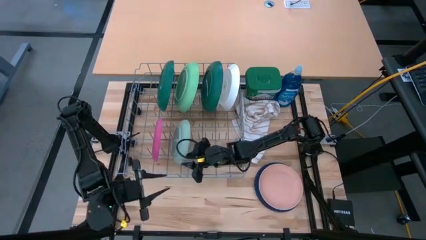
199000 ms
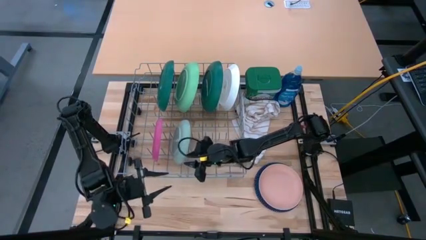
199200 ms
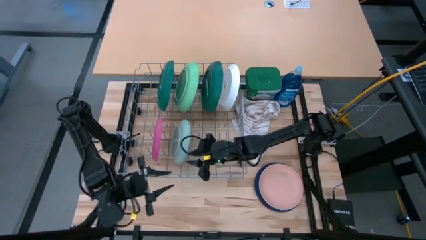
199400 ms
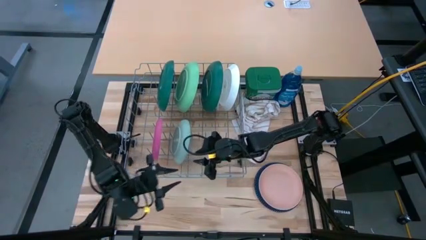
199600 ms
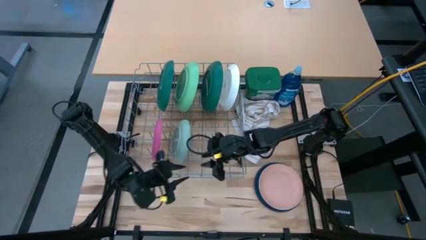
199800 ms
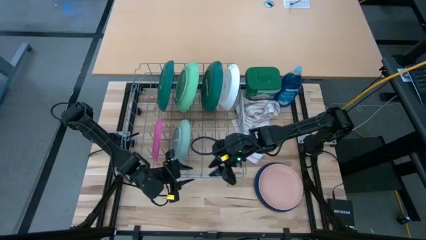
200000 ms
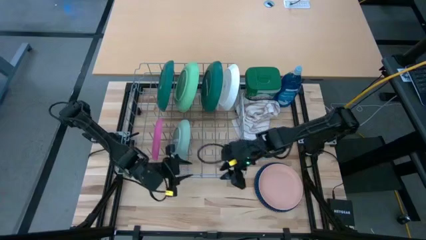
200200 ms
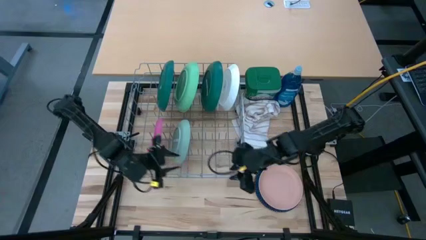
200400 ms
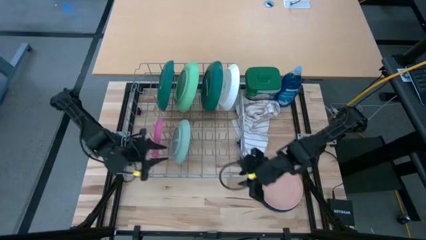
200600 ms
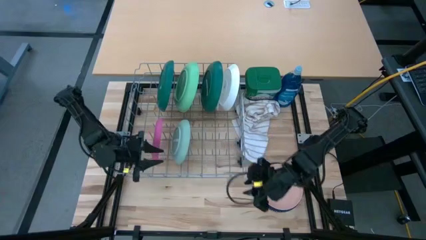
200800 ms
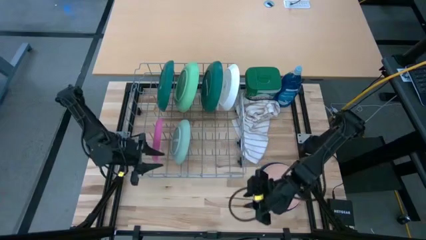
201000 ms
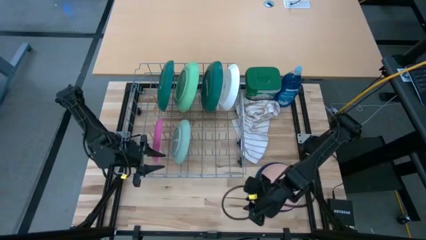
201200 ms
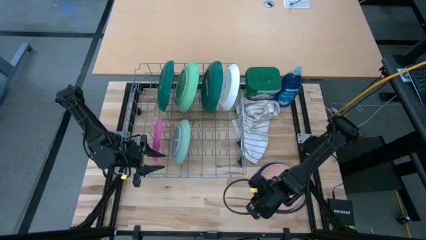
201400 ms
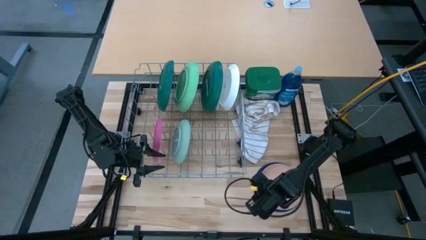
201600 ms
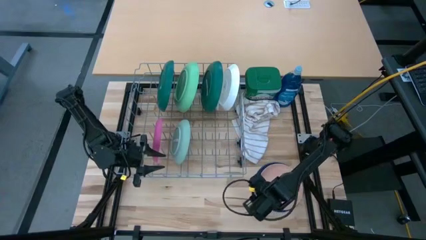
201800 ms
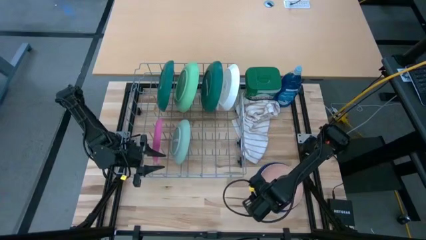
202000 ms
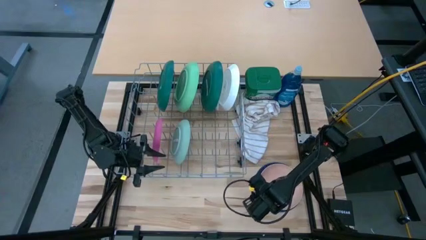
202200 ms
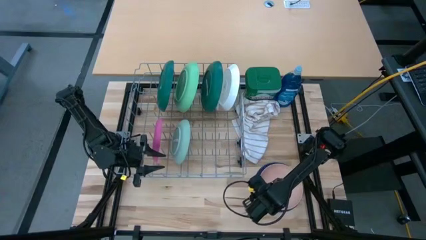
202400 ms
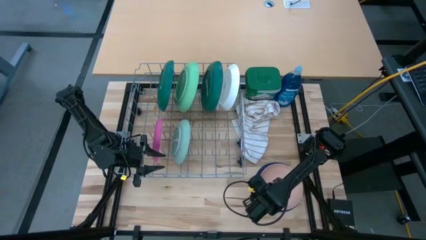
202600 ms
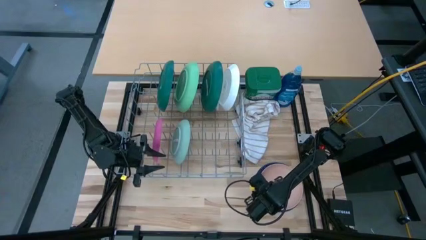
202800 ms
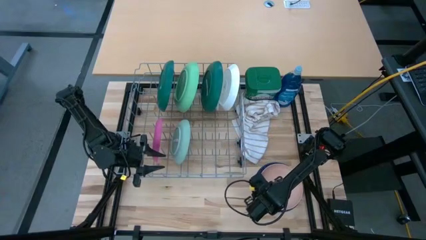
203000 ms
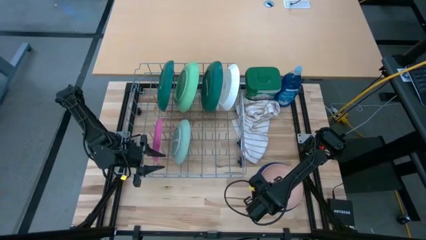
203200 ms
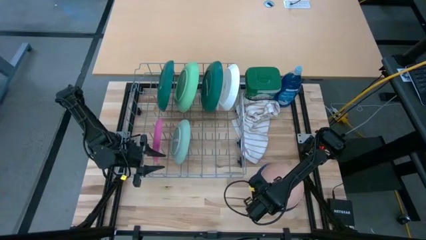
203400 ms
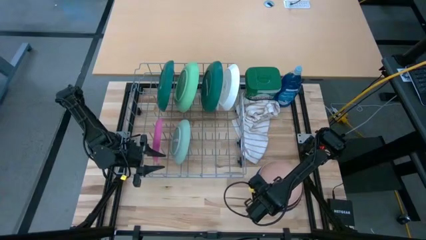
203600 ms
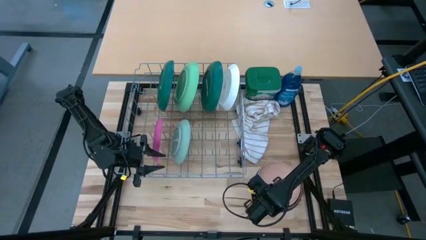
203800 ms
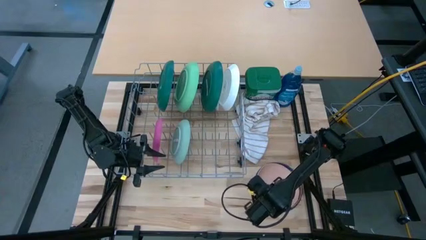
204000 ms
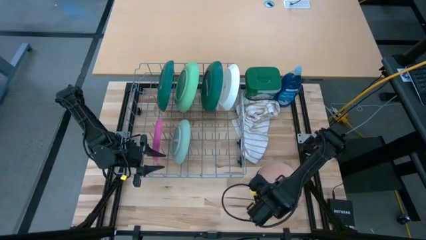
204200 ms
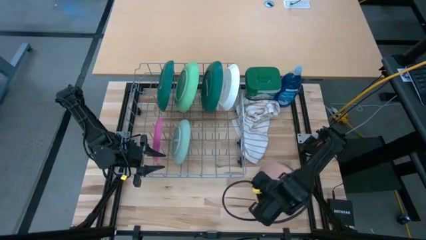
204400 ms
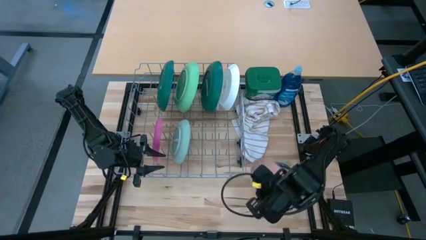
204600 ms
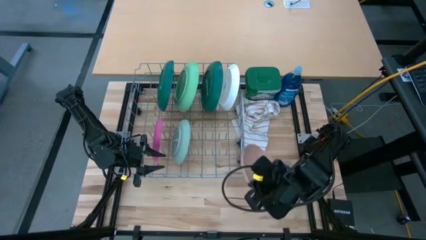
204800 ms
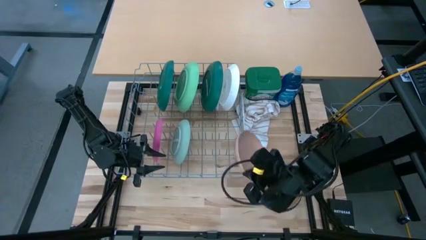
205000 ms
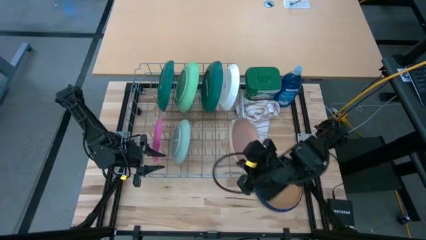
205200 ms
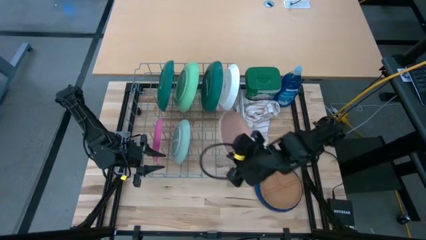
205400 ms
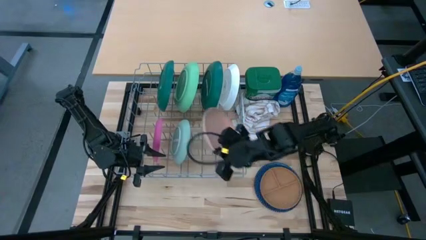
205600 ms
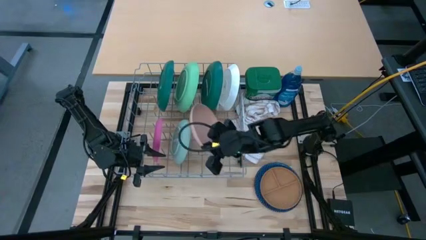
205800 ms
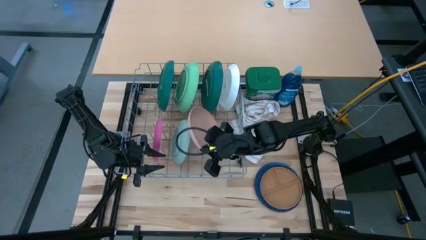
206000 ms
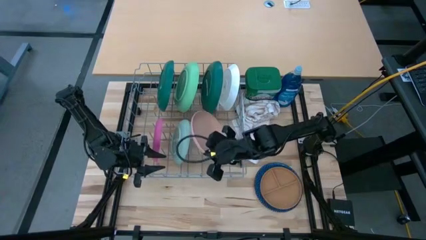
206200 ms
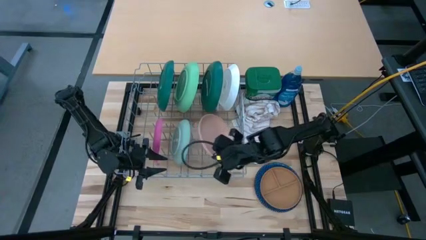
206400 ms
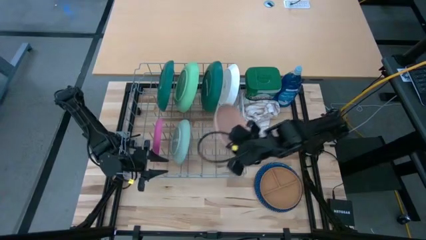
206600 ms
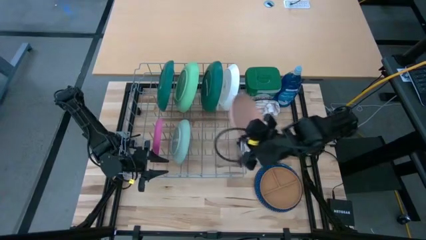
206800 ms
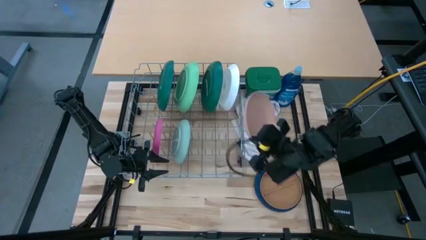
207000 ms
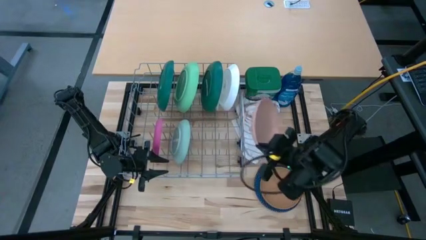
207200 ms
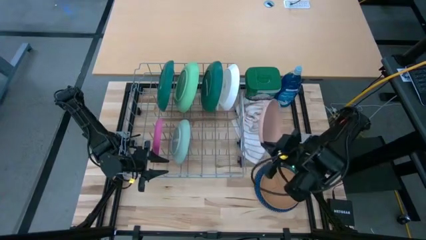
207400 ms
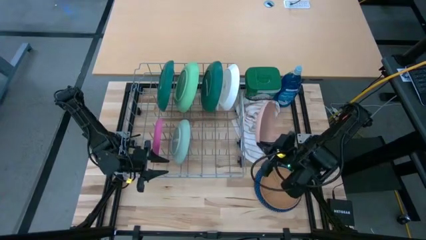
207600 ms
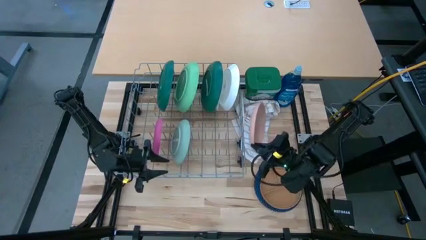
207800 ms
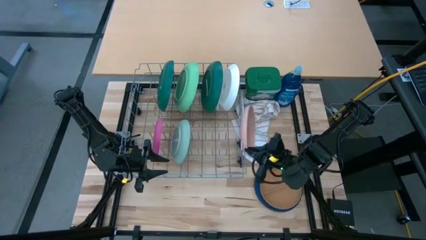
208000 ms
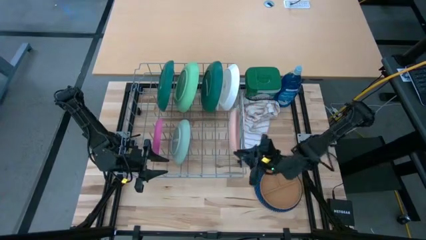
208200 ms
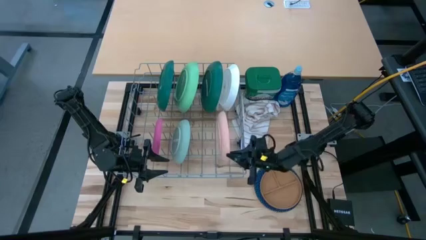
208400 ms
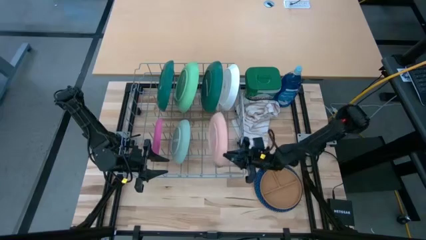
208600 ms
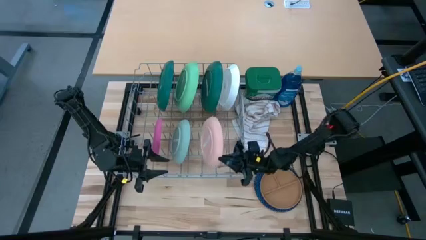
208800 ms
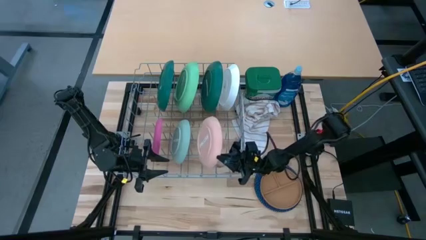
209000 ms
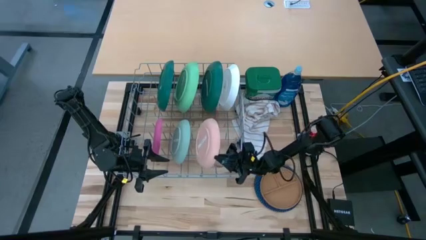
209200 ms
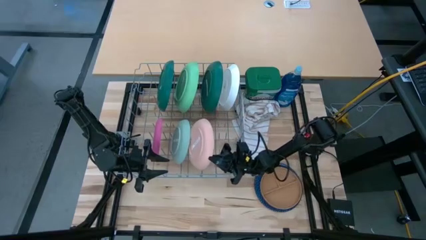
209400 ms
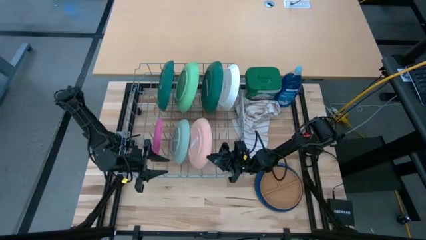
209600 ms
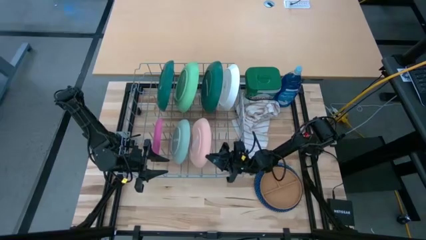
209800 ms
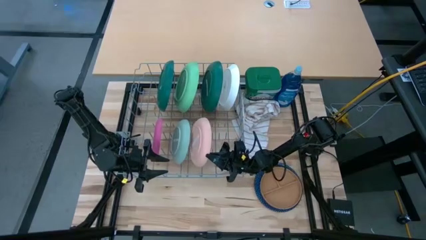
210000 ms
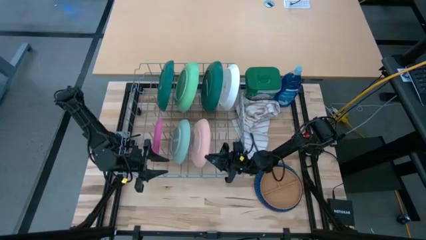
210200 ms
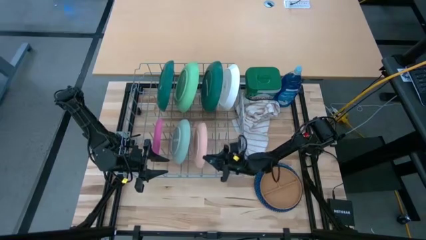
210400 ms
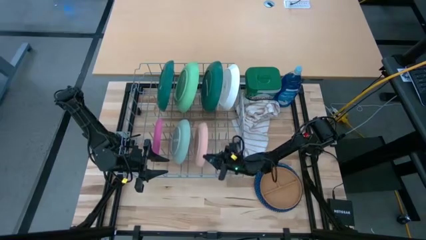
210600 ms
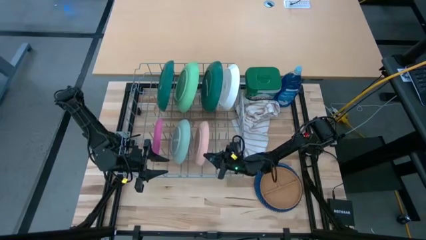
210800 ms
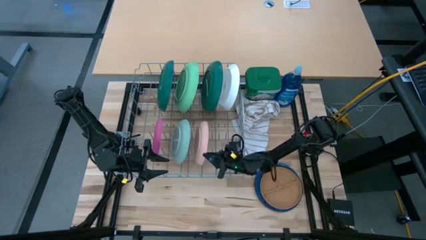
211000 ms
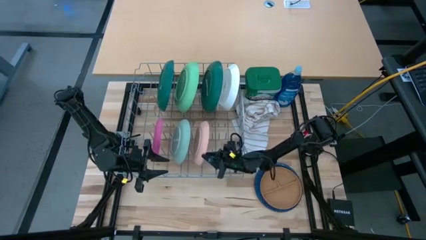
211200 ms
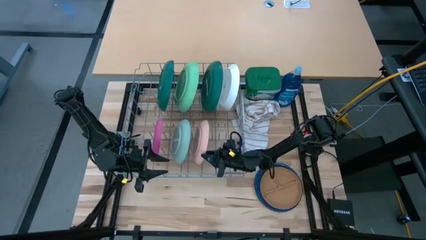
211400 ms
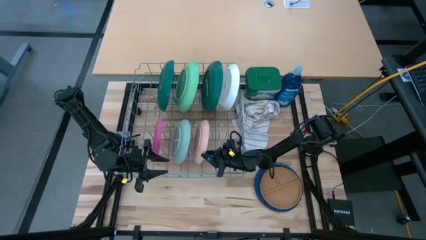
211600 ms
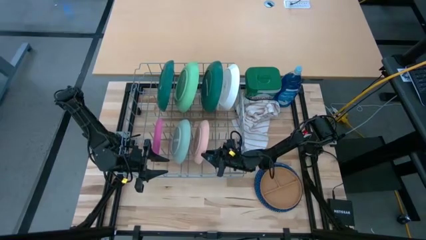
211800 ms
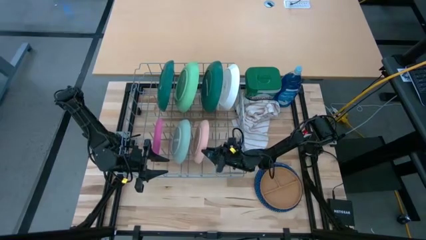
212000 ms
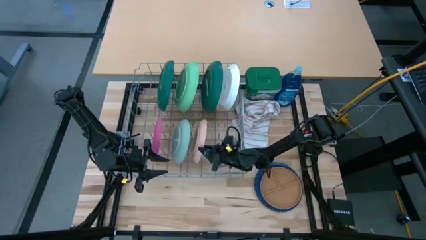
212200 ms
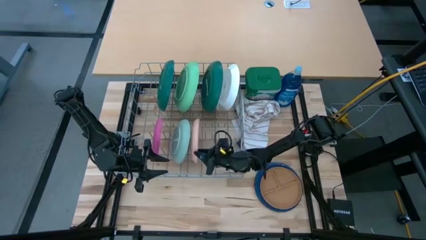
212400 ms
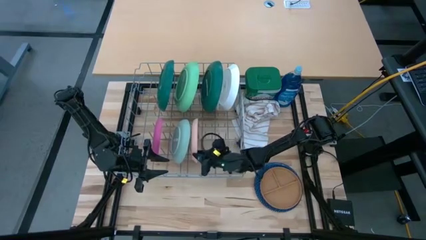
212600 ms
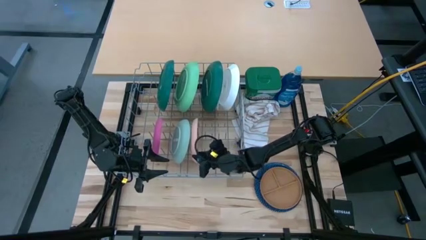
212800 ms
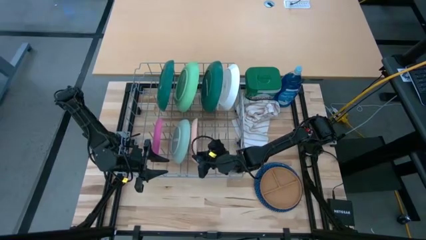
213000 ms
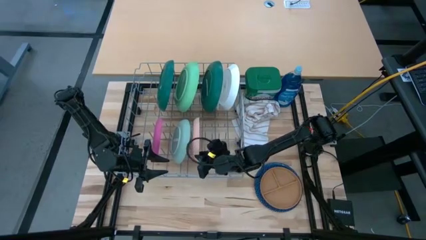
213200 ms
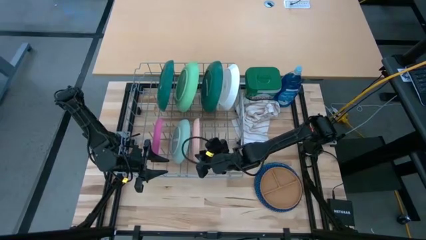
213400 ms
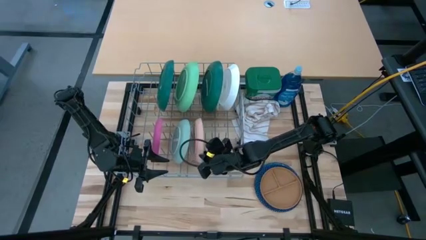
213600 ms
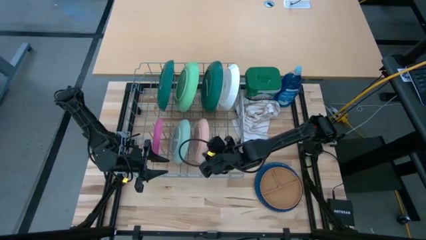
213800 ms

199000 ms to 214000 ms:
Task: Sort dishes
Put the light pink plate in the dish rack
